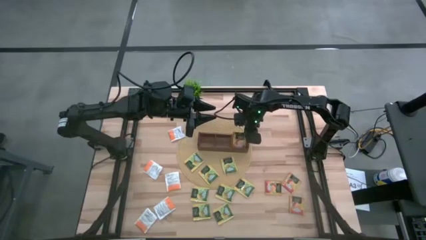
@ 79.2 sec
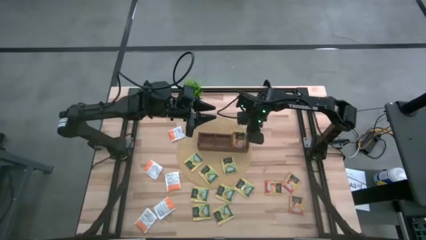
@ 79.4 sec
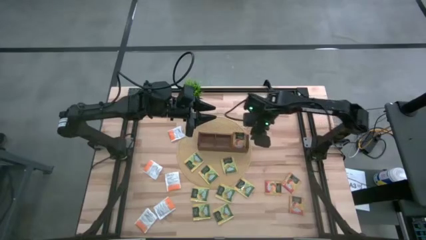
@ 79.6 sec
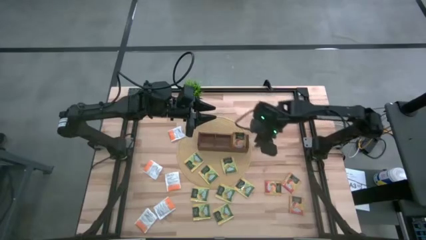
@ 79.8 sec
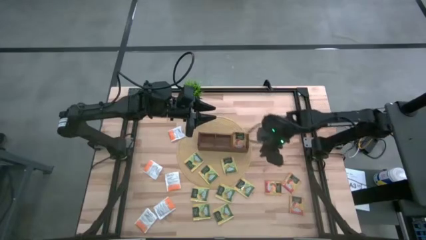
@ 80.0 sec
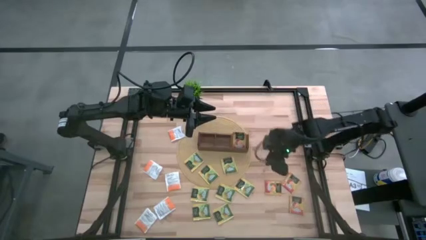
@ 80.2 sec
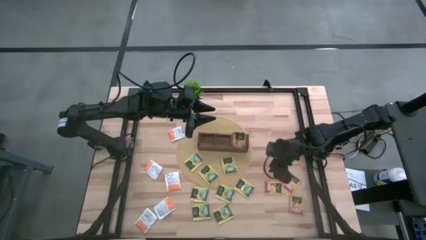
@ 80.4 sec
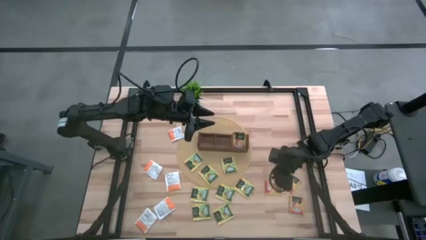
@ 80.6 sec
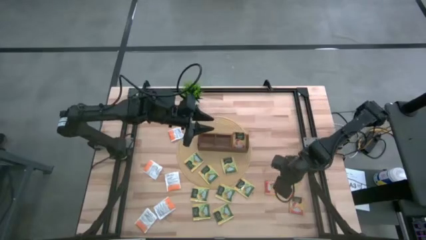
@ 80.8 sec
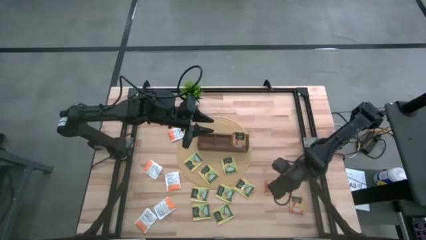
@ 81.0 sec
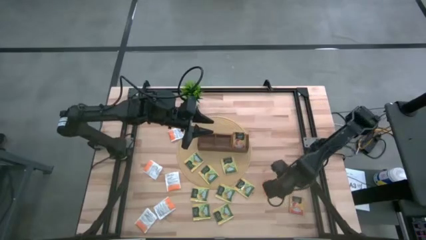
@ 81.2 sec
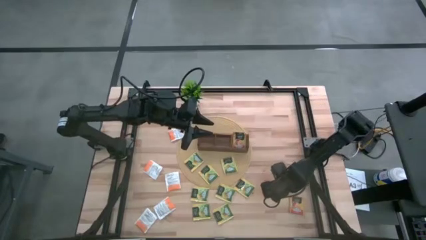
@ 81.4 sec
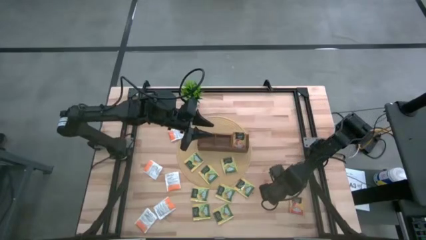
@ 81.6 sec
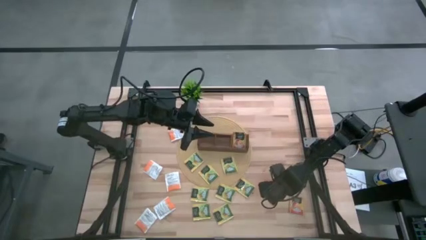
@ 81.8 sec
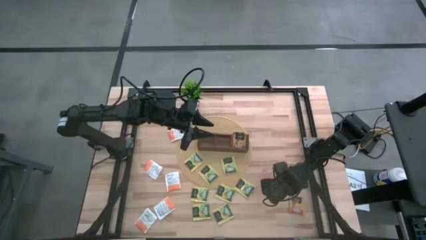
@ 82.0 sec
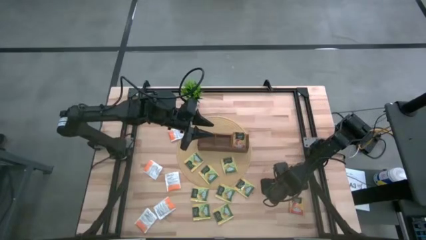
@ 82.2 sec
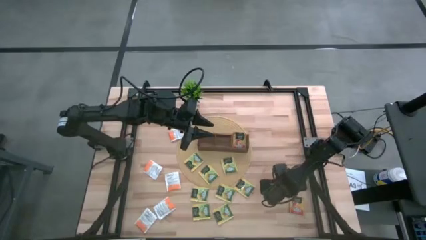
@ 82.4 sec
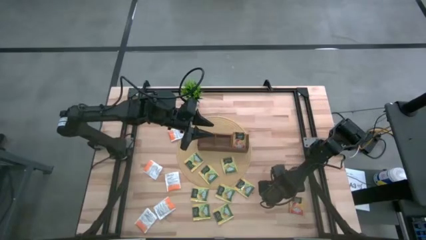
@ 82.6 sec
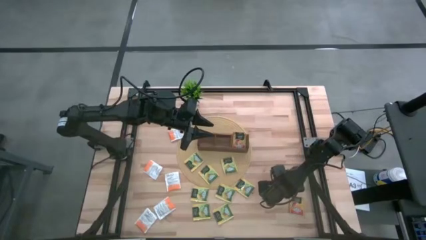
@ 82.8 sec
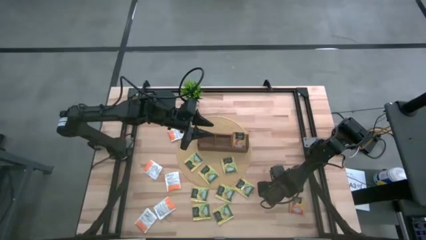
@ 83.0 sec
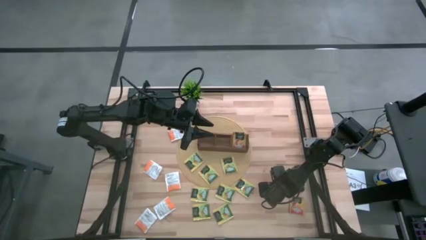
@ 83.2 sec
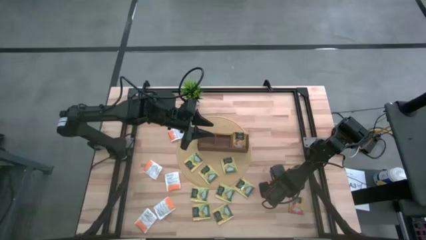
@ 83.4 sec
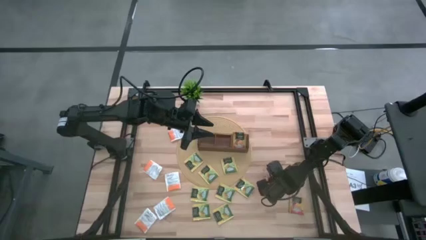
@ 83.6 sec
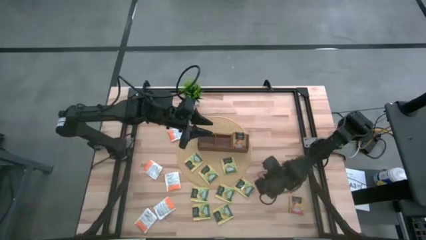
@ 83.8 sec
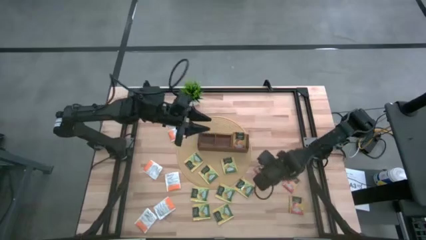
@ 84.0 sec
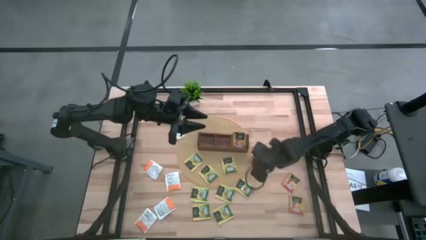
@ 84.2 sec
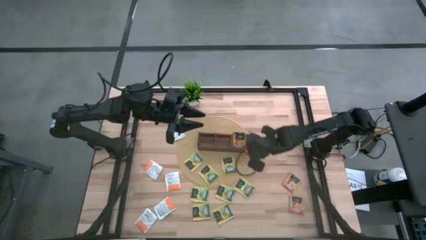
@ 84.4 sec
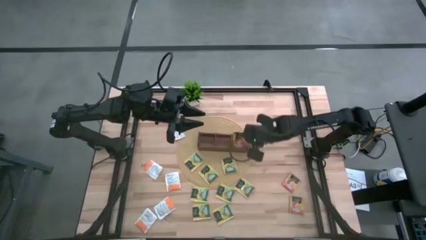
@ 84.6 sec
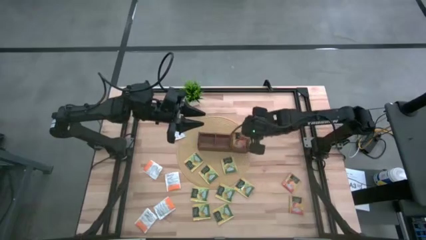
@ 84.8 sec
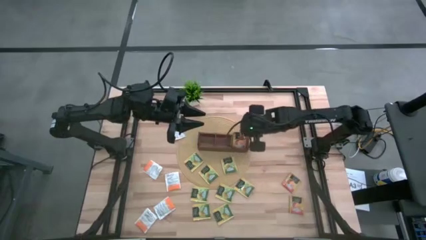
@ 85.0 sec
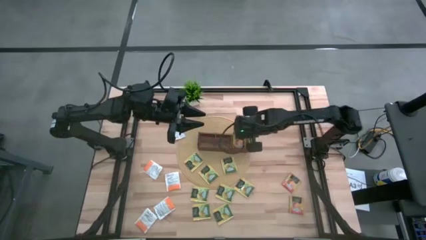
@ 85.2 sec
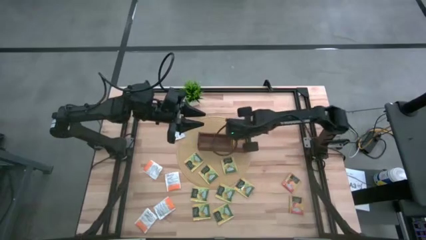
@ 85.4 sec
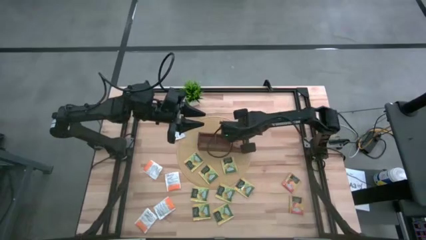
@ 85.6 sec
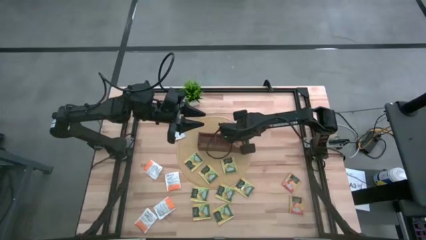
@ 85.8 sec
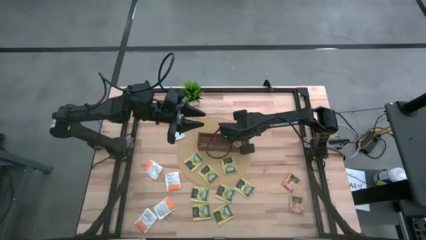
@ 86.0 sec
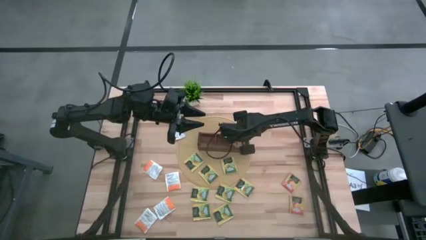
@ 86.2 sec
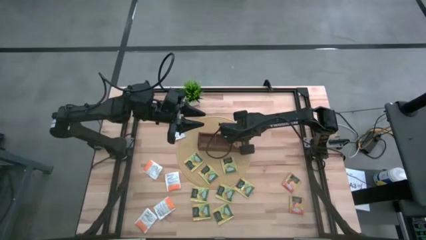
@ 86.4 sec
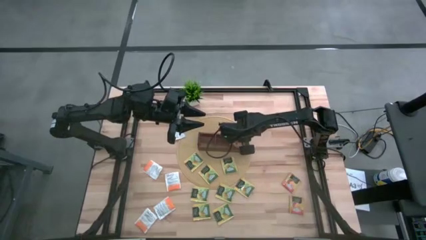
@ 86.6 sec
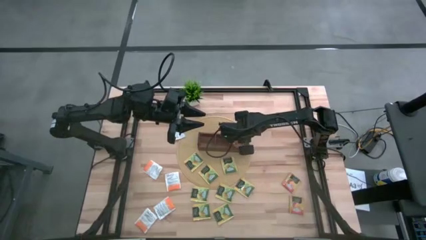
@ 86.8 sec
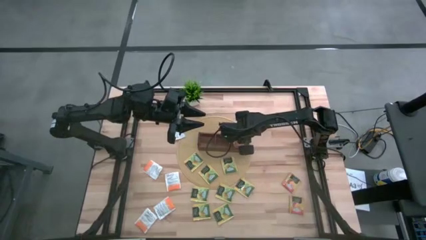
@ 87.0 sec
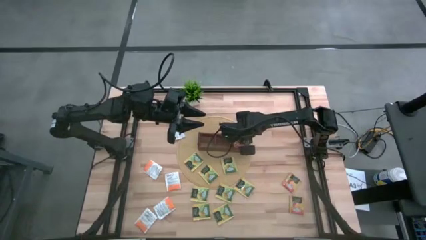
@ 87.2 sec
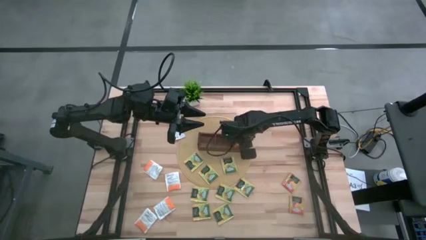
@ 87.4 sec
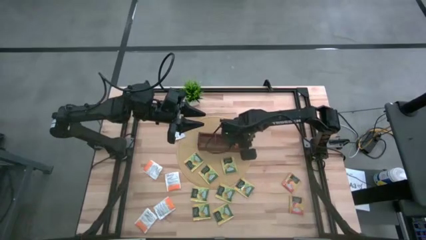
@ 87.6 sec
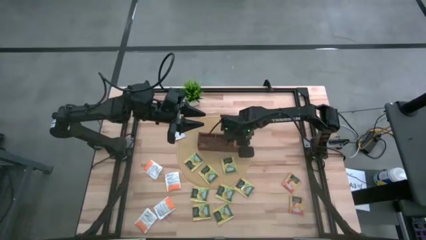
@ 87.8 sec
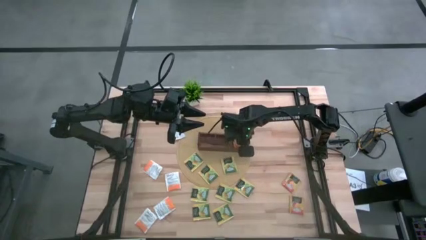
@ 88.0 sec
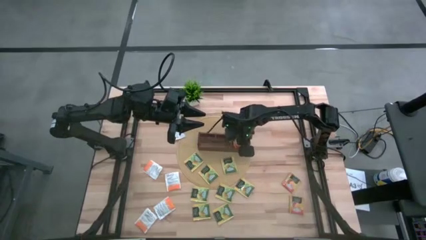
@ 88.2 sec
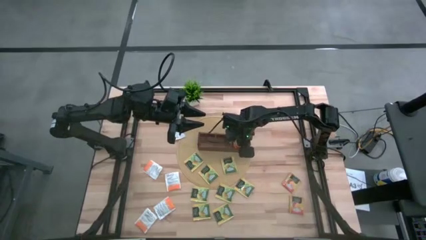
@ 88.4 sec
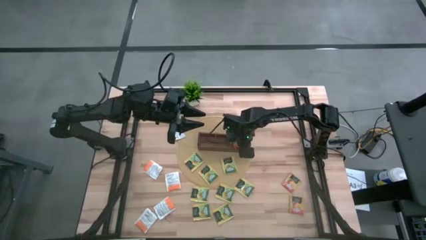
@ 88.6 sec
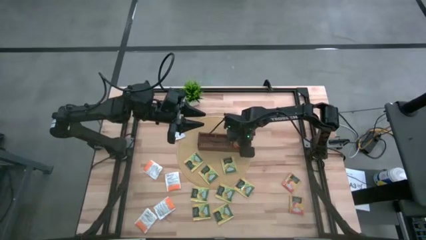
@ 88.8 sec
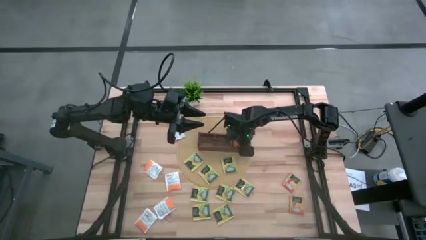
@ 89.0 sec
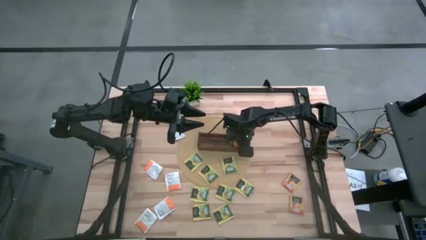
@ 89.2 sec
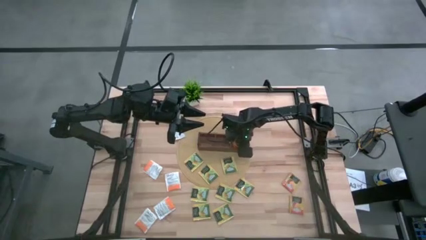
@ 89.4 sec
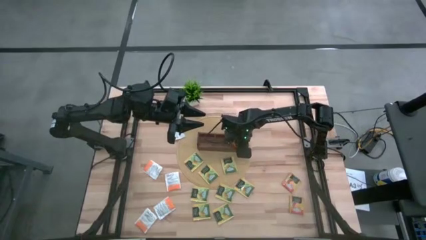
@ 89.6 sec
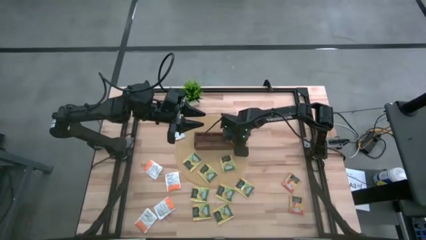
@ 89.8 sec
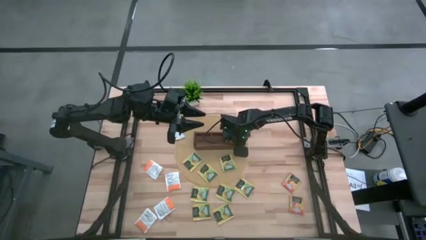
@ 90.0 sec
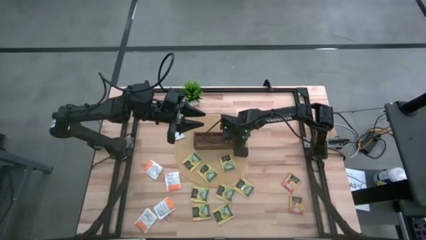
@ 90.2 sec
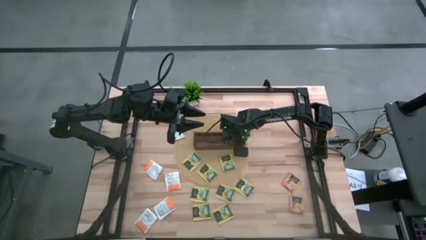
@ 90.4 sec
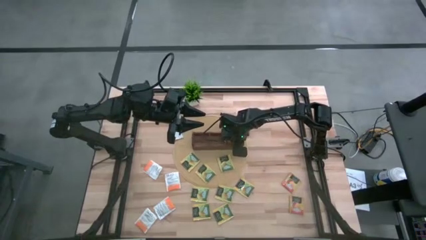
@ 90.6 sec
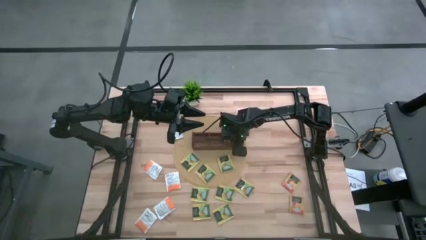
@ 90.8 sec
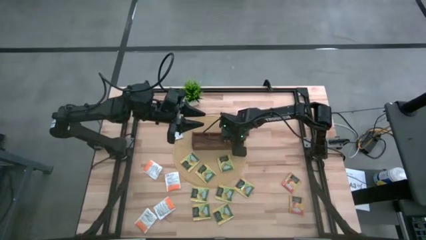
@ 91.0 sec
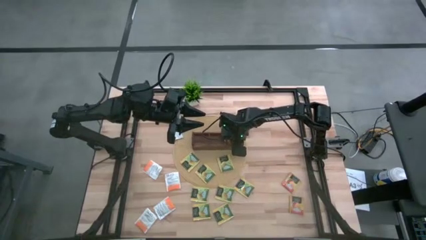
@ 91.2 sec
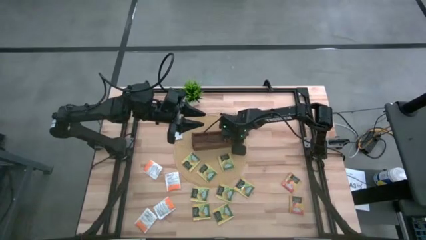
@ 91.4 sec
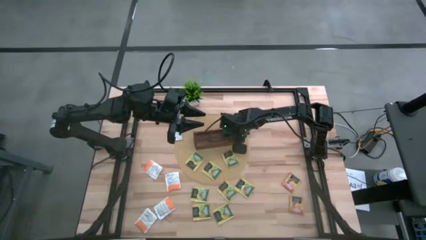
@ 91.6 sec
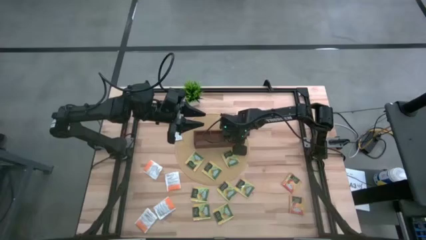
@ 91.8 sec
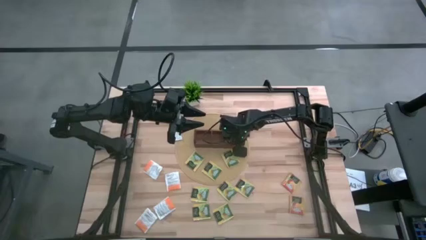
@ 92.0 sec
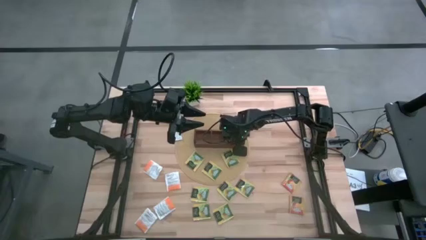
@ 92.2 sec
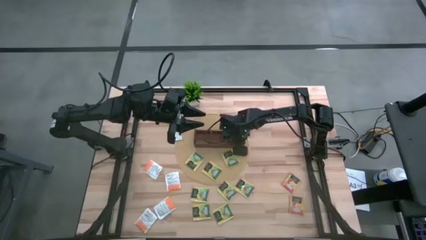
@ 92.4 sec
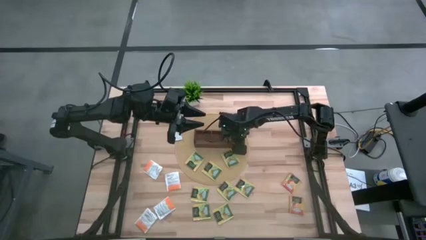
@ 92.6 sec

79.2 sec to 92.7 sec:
Task: Pick & Place Tea
Put the orange tea bag into the right section of the wooden organizer
